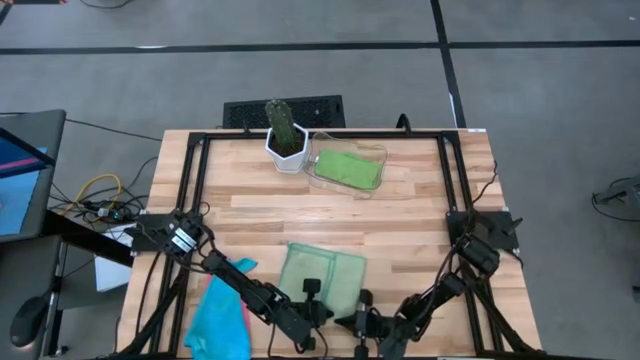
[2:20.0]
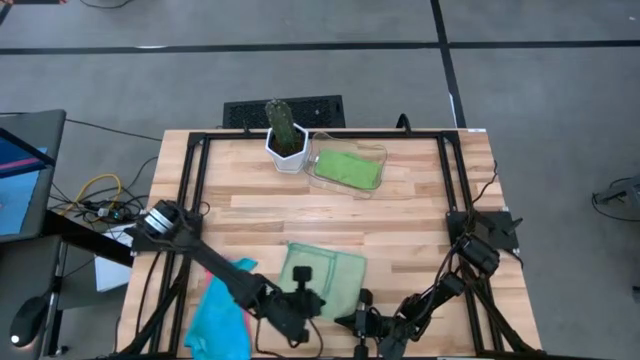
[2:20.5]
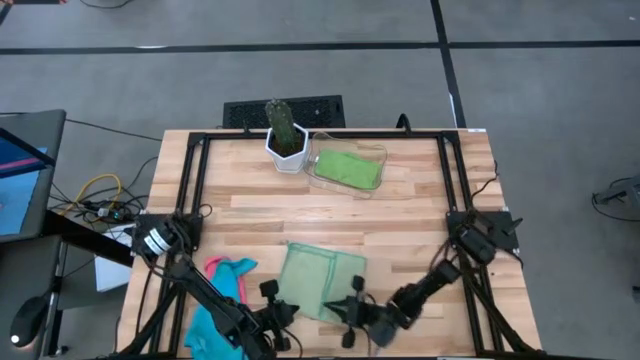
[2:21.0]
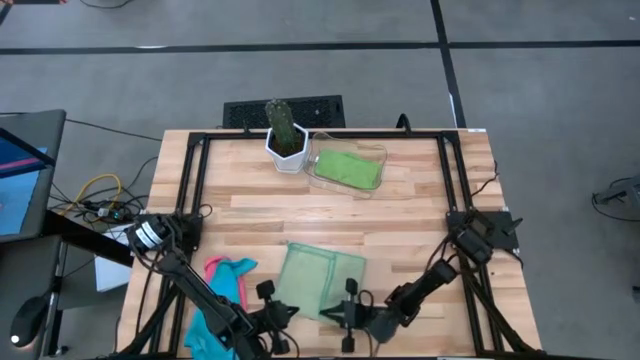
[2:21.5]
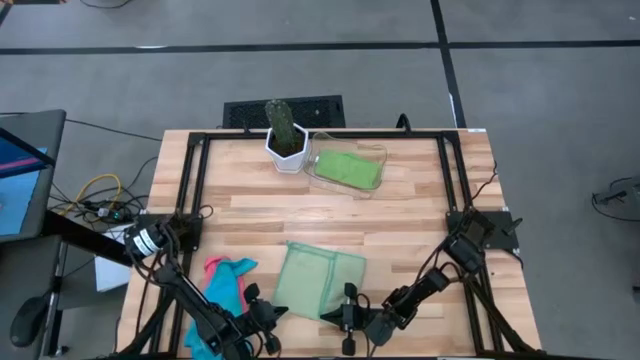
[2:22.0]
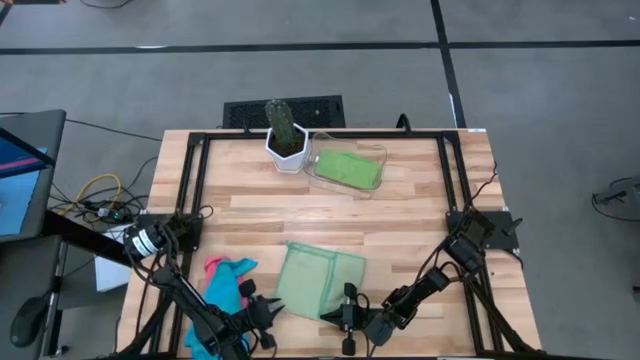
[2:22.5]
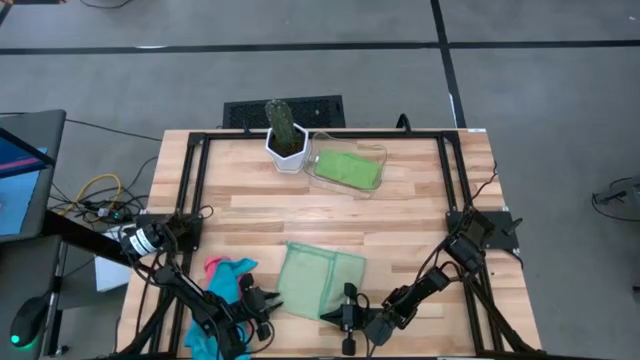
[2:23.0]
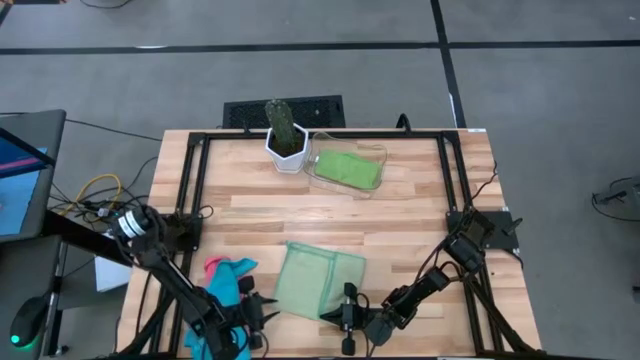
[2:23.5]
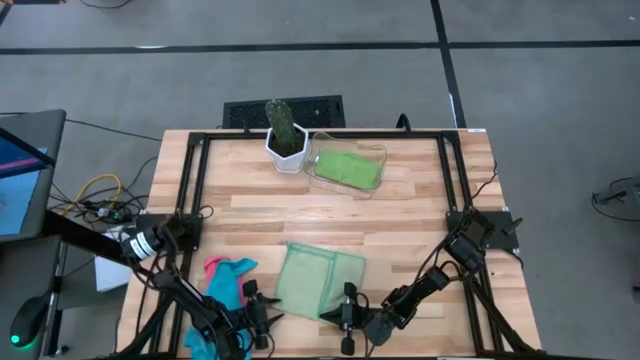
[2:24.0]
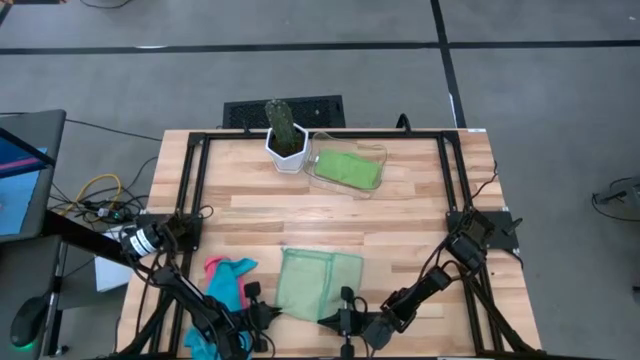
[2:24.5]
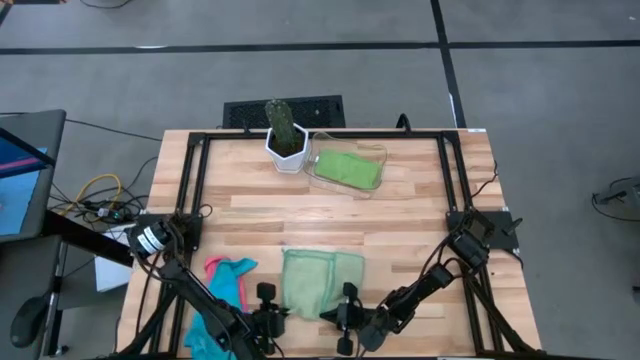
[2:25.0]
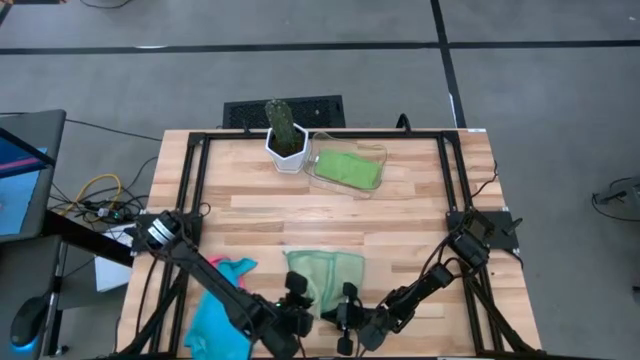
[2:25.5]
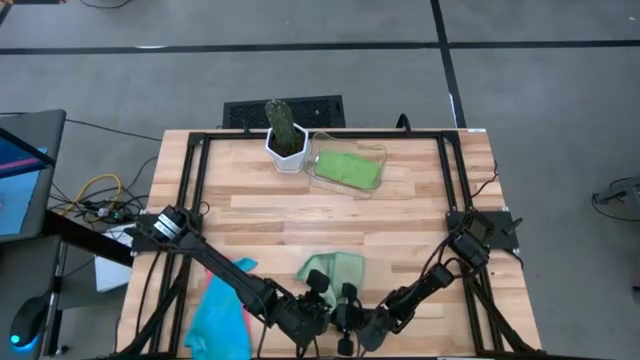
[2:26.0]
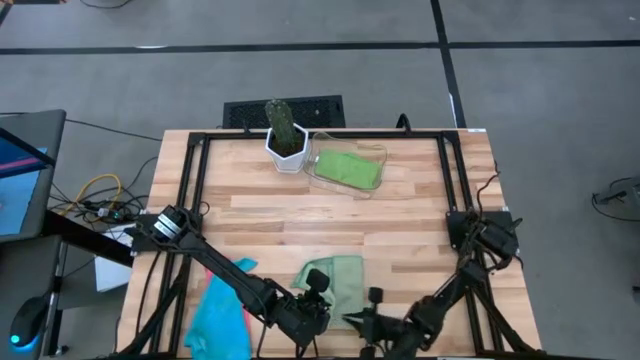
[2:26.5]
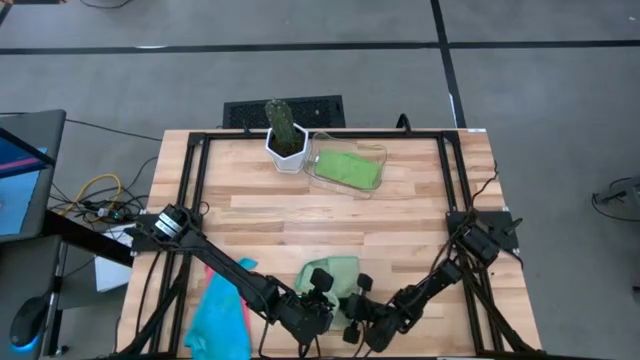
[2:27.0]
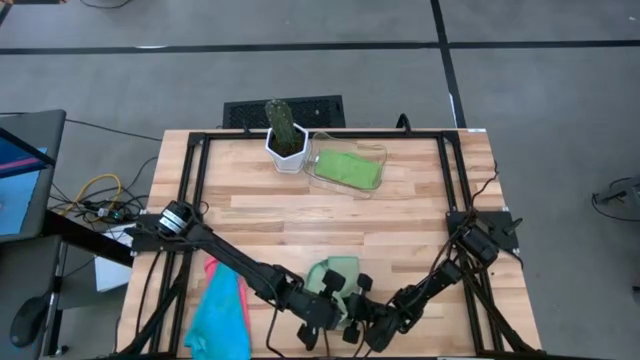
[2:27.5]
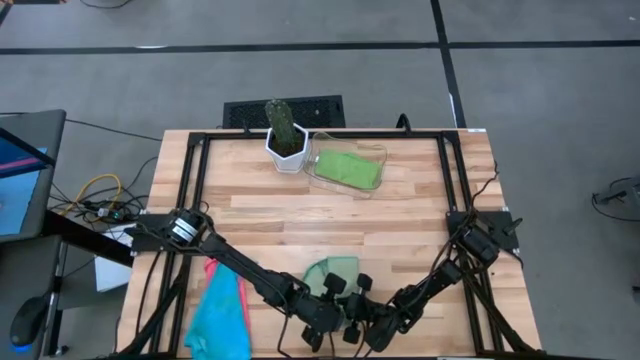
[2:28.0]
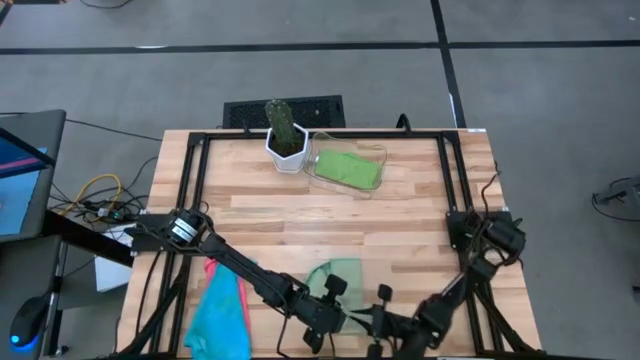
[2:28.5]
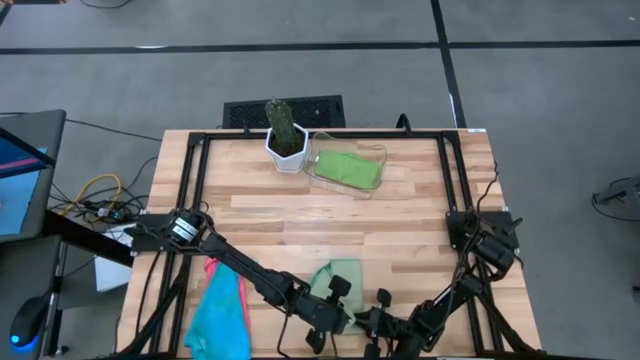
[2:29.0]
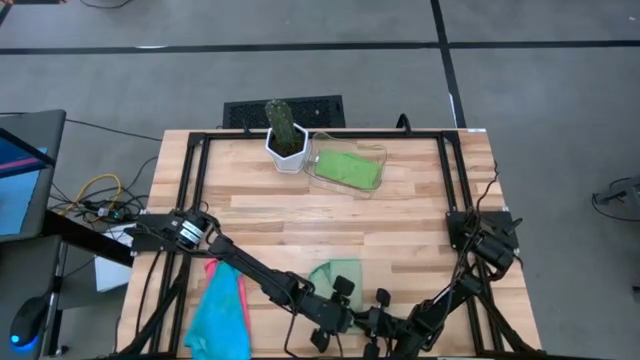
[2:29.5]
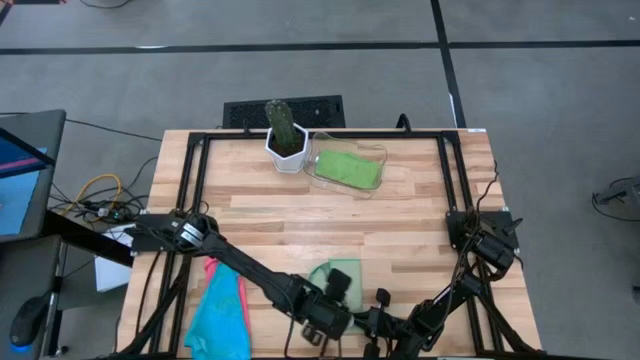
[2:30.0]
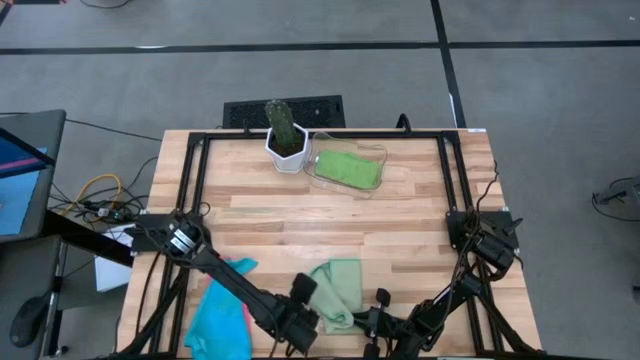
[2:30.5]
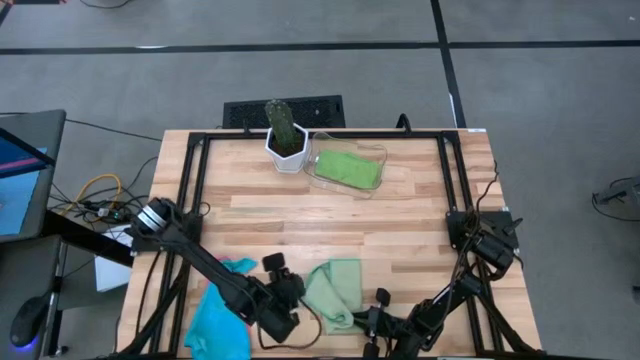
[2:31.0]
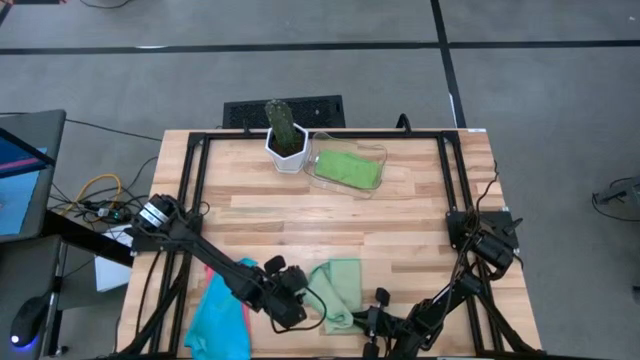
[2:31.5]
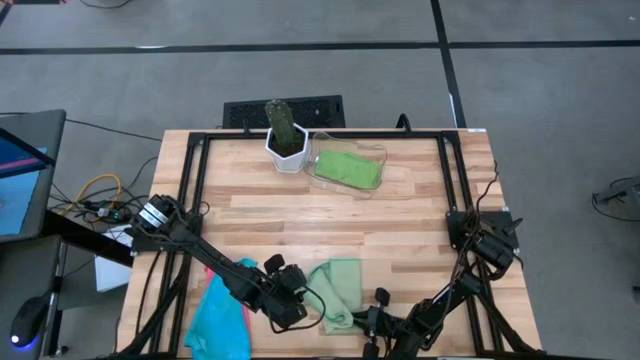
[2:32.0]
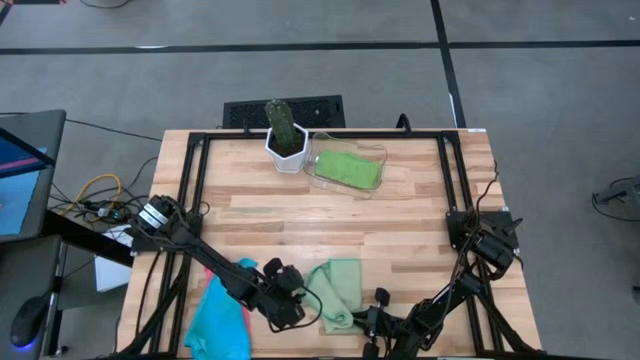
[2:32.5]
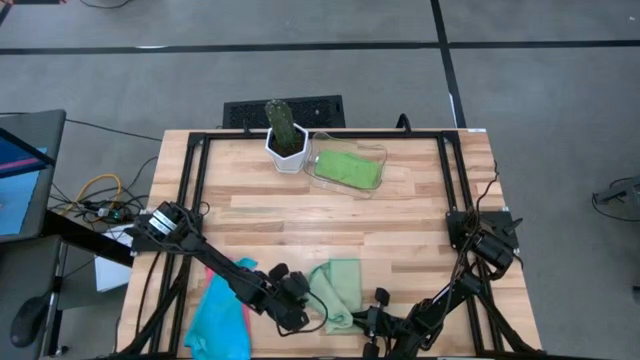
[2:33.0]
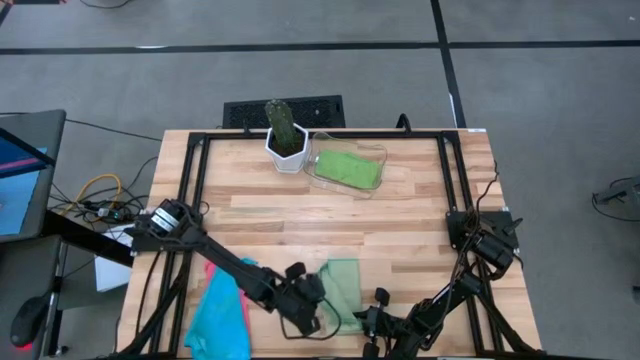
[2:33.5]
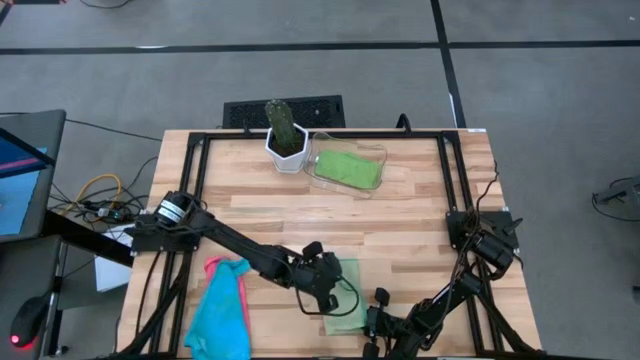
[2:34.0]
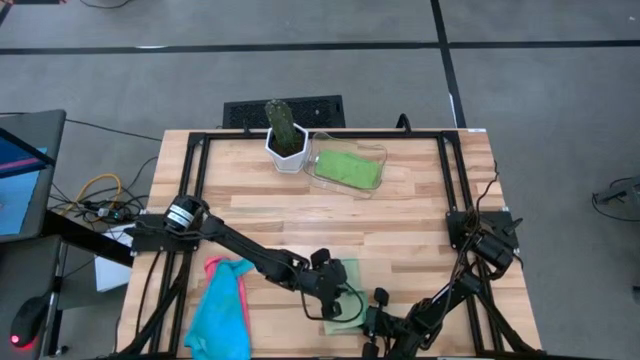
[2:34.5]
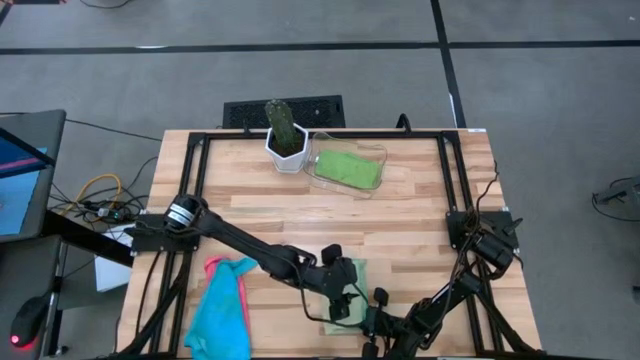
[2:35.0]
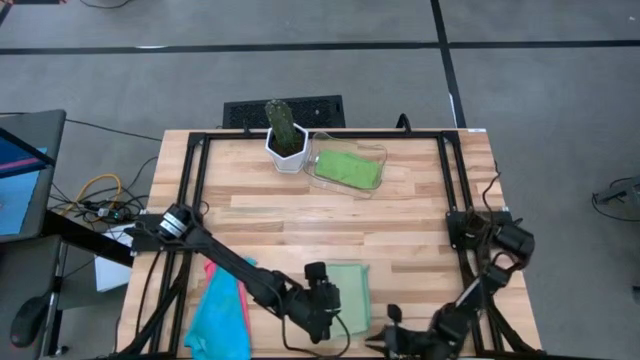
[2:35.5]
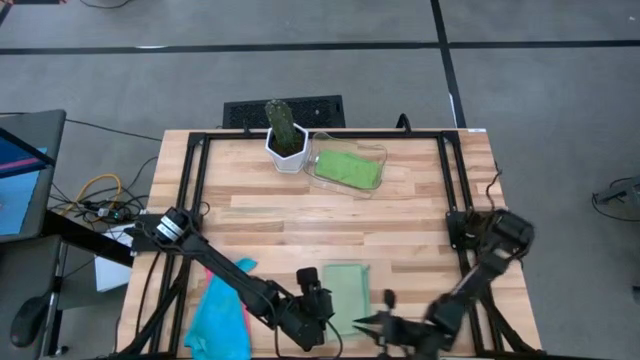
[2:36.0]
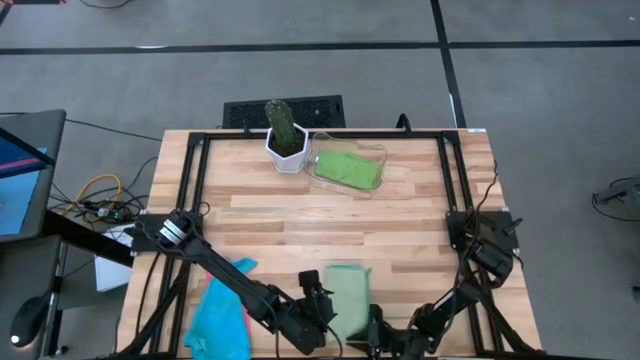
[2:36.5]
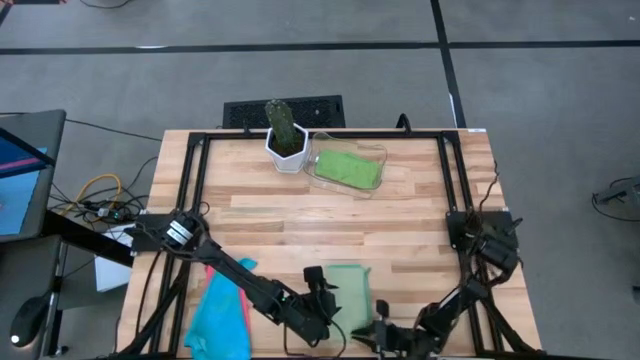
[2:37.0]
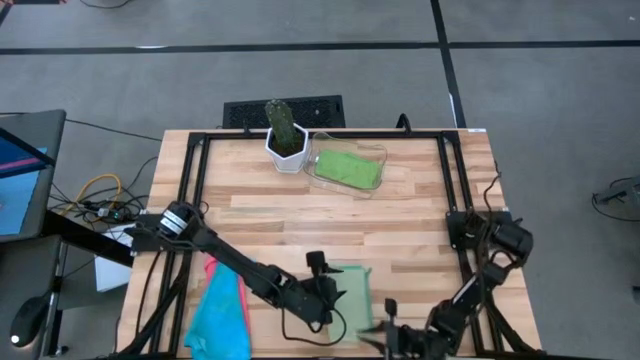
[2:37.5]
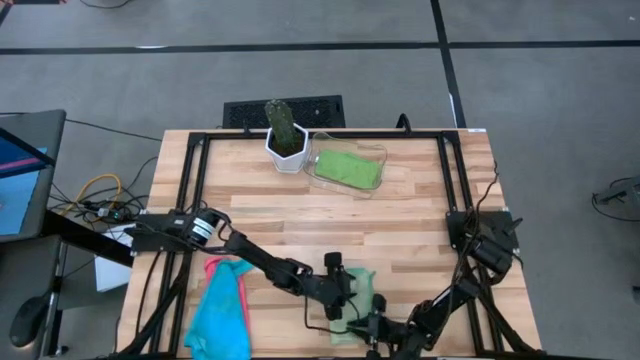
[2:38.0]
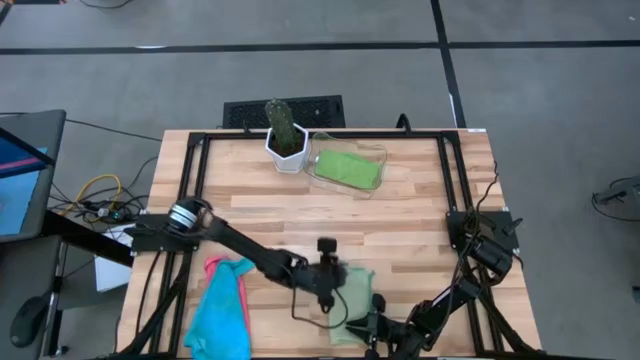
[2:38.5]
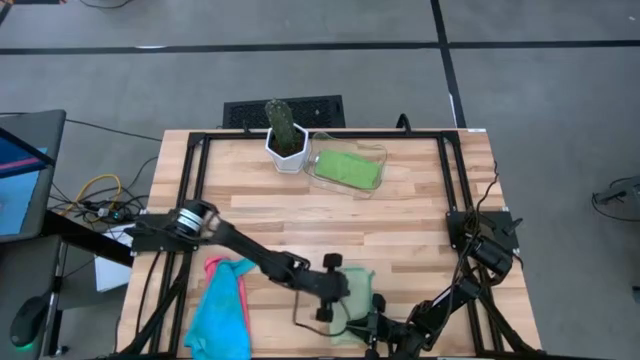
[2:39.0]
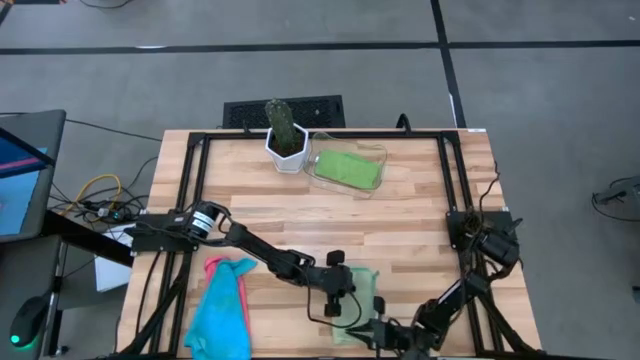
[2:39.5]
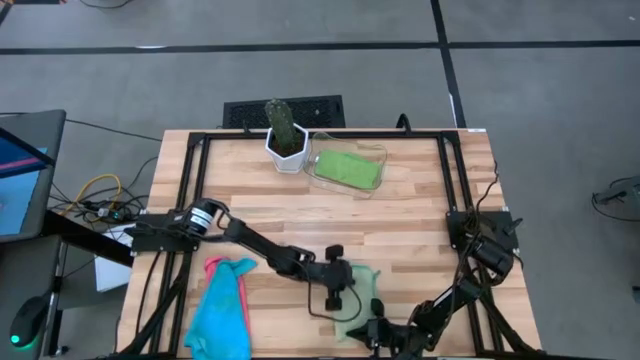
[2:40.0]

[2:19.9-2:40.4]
Task: Fold microfiber towels
Fold the light green towel
